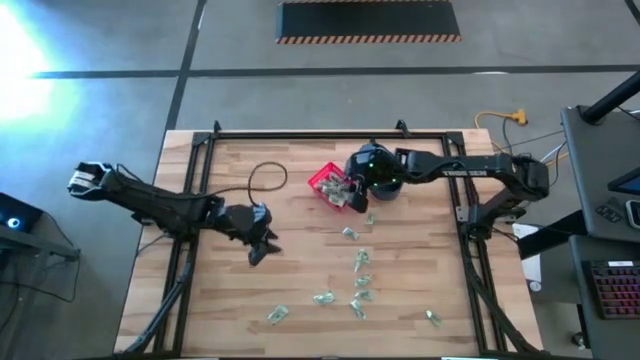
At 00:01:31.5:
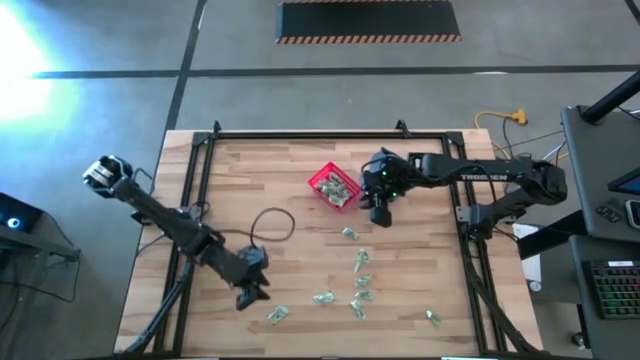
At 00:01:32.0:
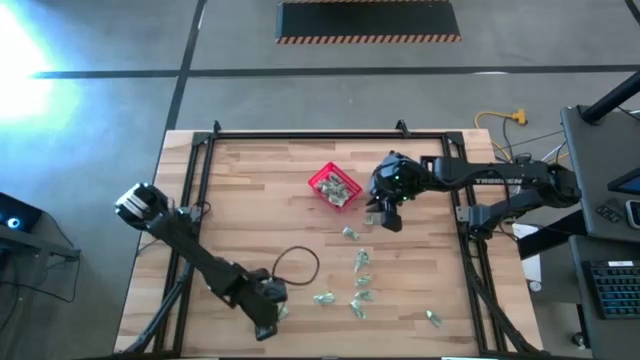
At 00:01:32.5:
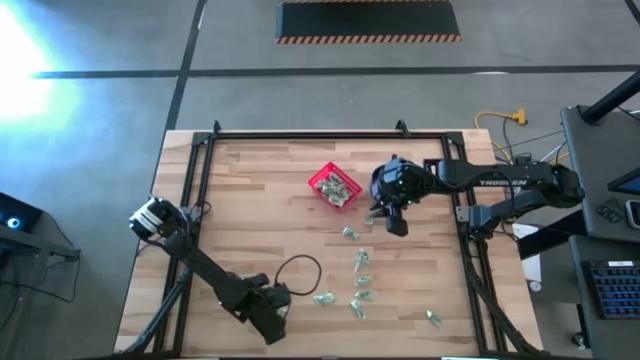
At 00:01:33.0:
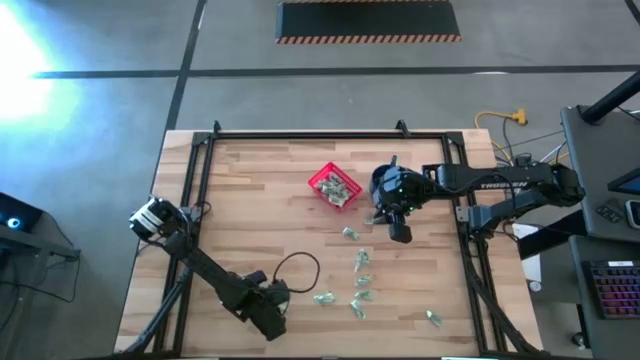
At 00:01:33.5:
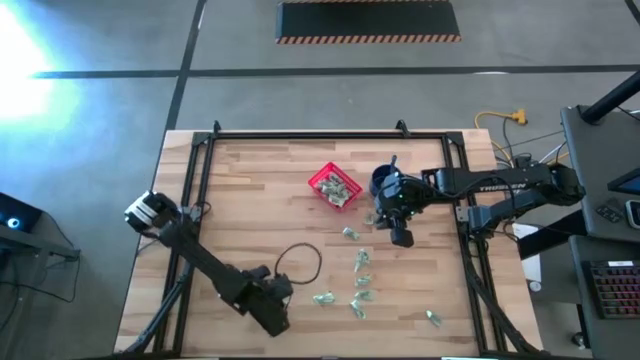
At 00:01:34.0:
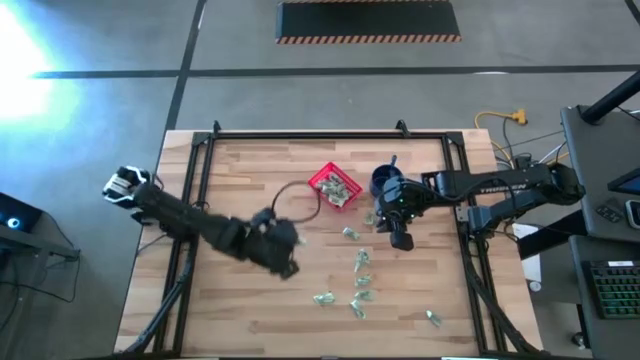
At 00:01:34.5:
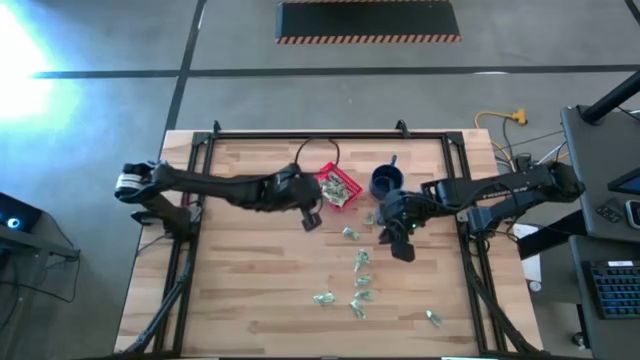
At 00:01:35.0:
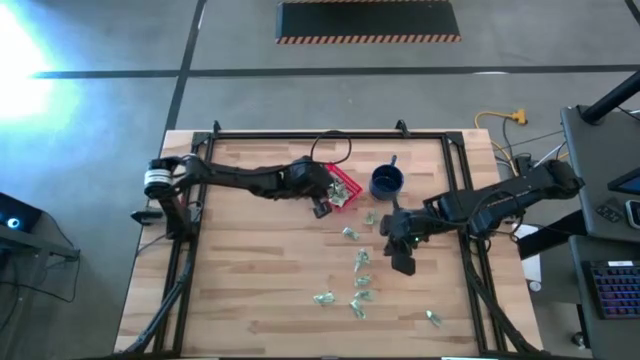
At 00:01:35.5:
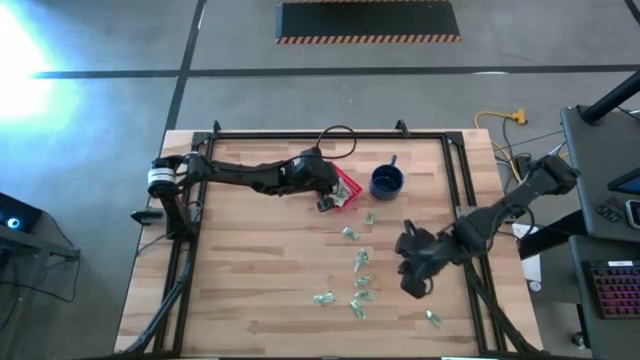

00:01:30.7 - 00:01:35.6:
Task: Pick and place Stevia / Truvia into bins
Put the stevia packet into the red basket

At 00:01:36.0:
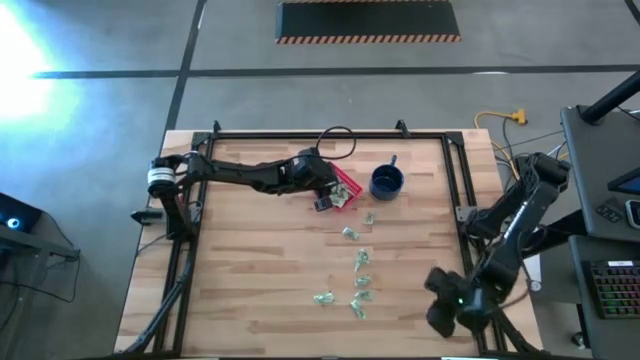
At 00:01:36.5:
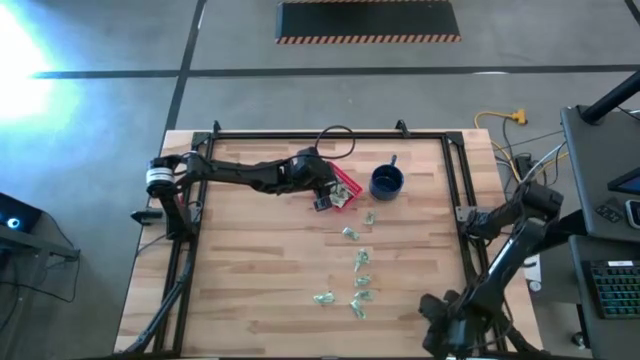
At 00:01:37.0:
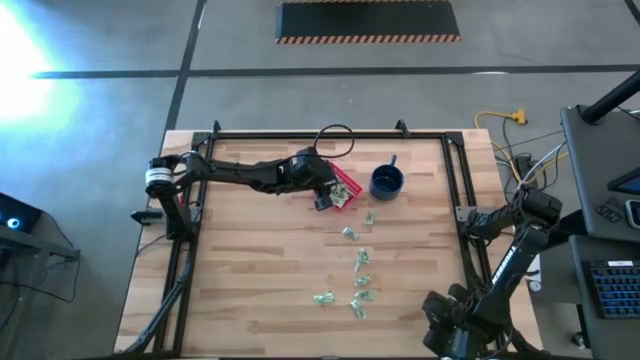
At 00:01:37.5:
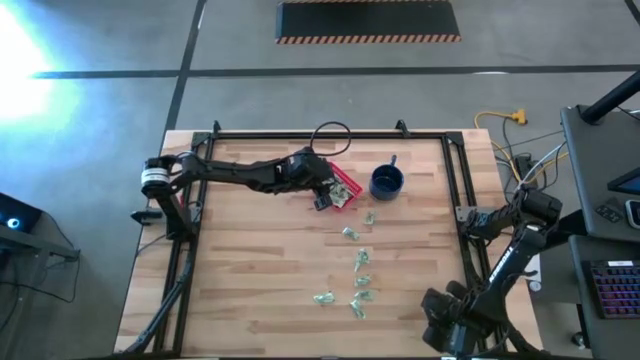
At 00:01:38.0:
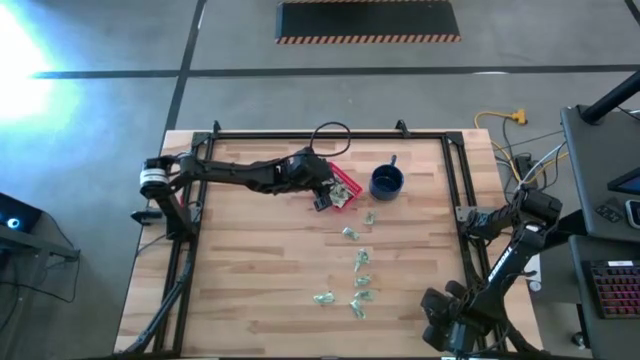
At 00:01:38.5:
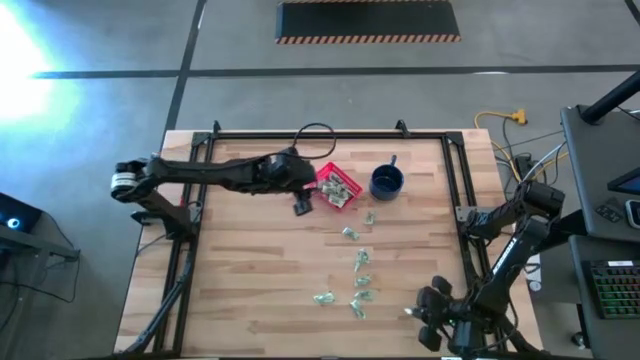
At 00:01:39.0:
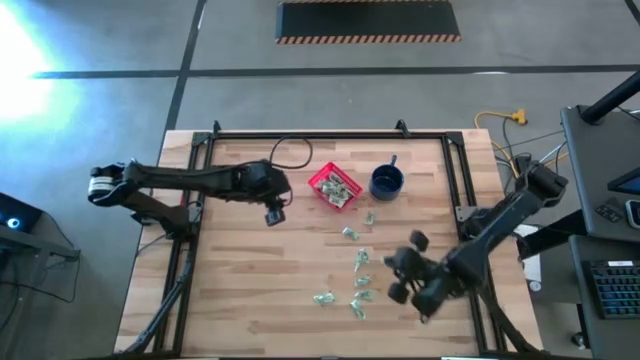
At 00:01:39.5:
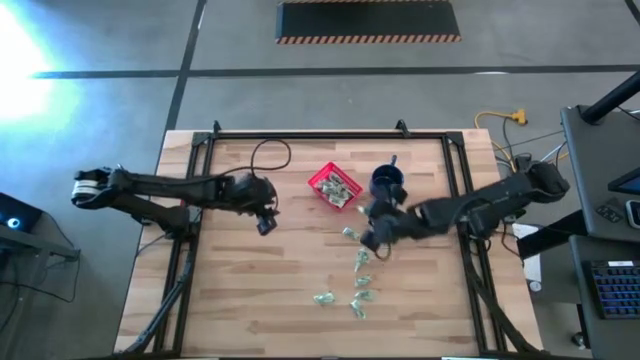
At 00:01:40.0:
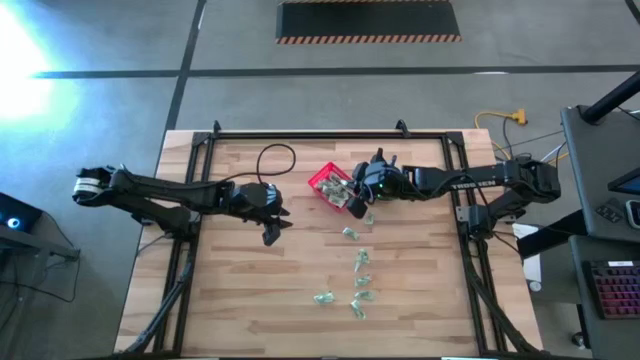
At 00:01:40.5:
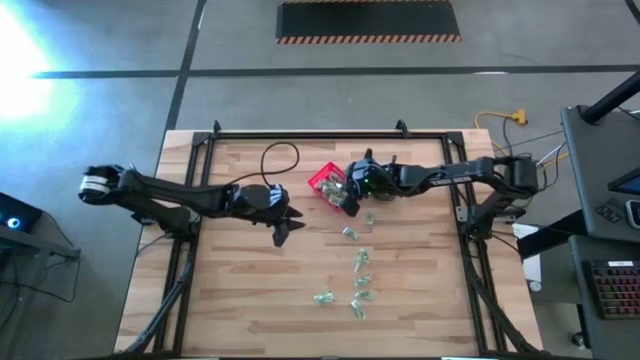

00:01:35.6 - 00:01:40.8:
Put the stevia packet into the red basket

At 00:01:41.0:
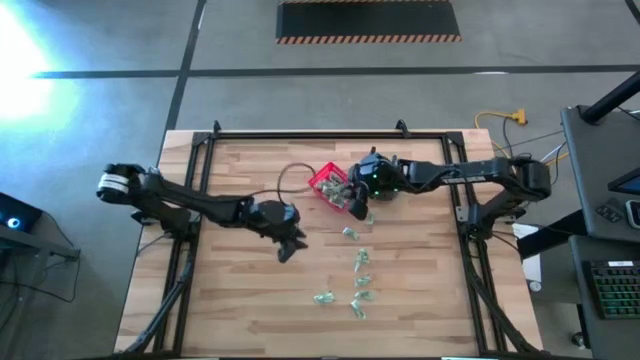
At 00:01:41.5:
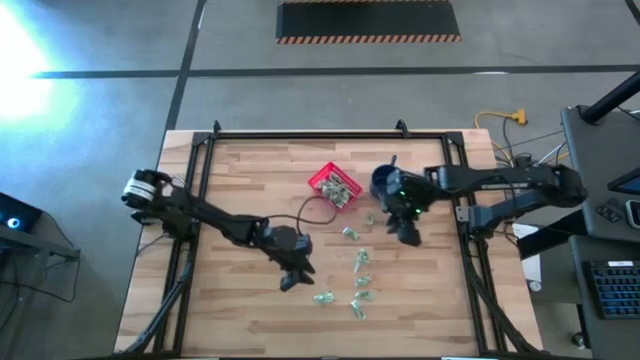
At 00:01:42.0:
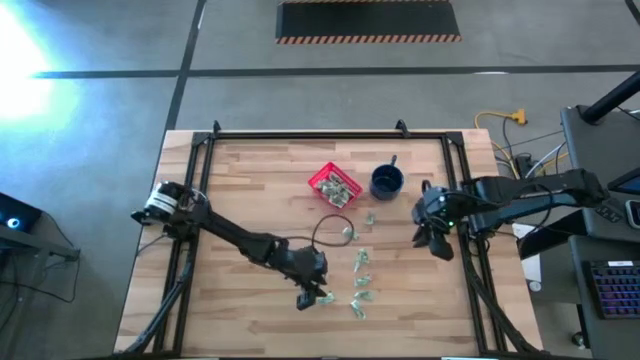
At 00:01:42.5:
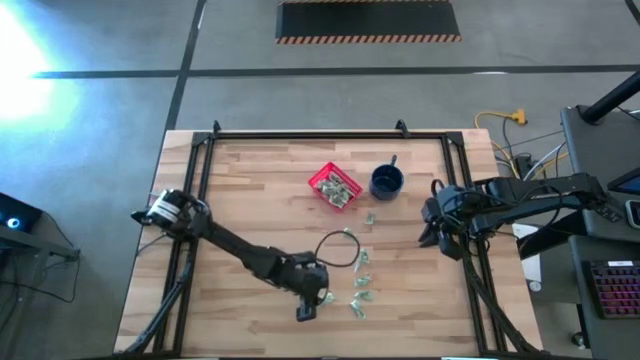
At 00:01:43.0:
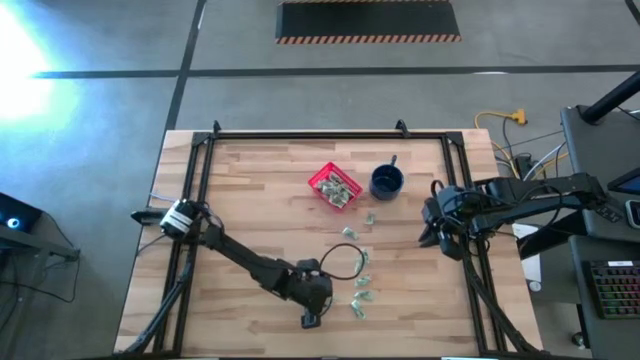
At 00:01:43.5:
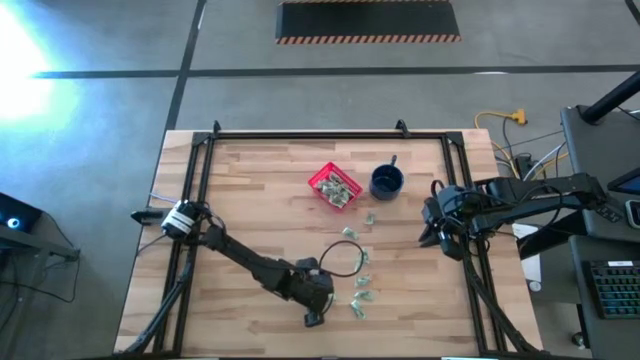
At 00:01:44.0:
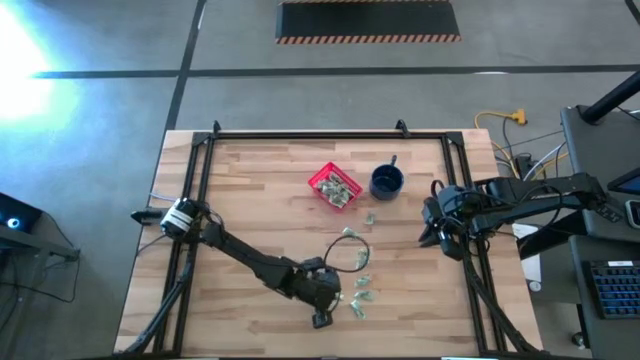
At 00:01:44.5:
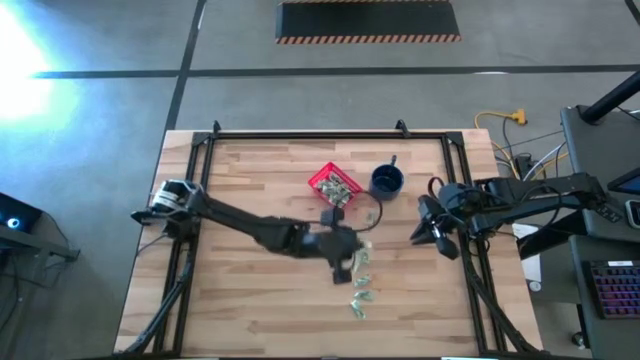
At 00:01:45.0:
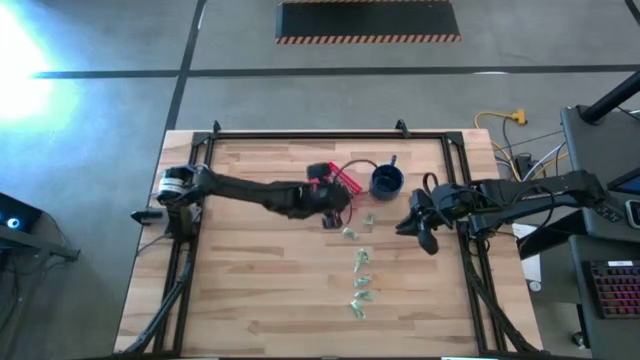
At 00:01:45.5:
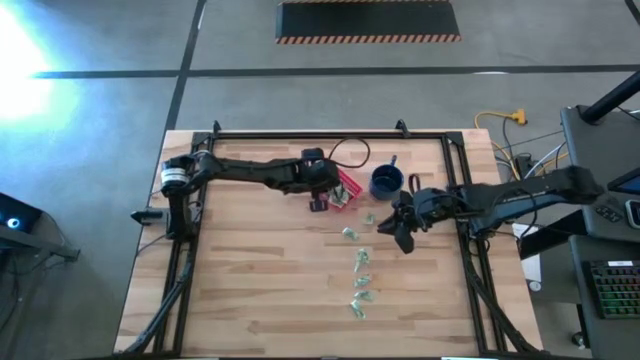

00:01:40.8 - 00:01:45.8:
Put the stevia packet into the red basket

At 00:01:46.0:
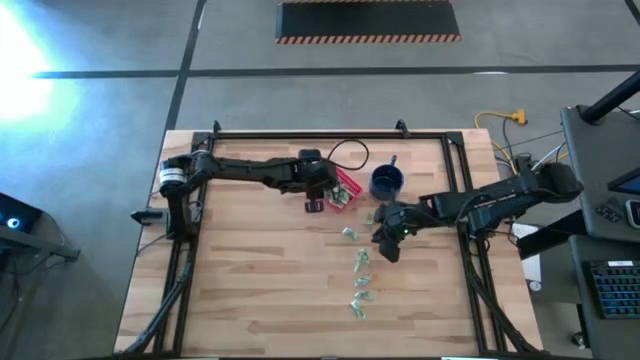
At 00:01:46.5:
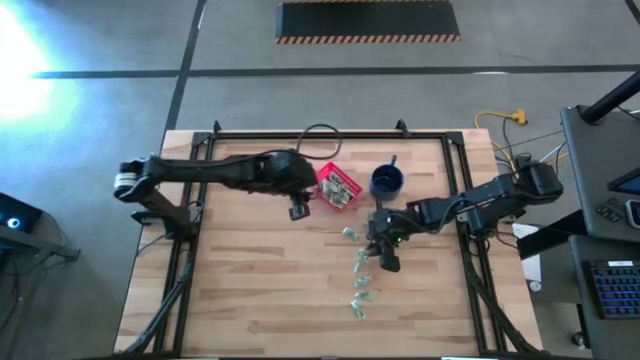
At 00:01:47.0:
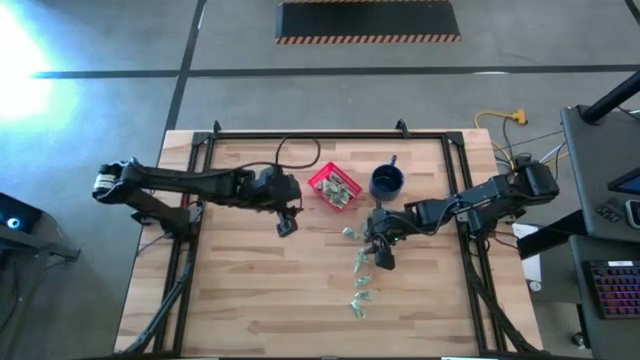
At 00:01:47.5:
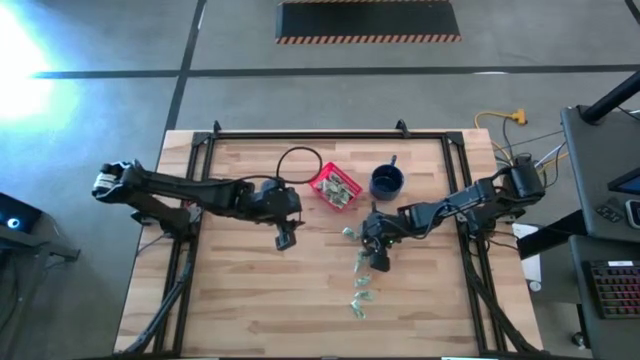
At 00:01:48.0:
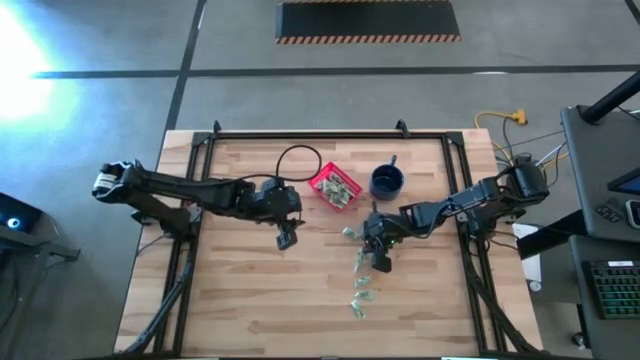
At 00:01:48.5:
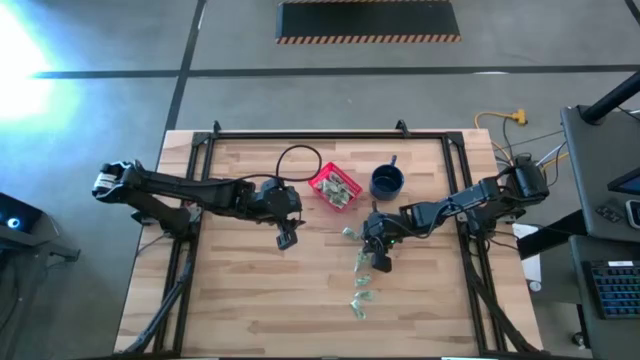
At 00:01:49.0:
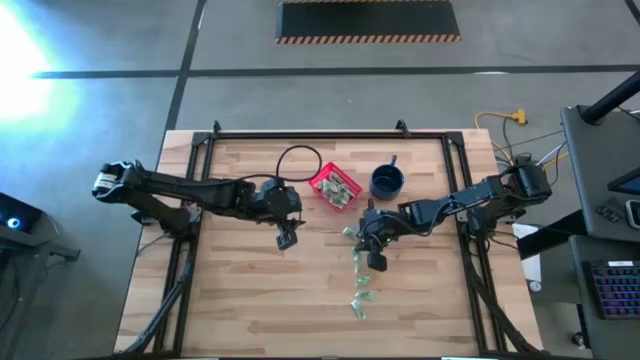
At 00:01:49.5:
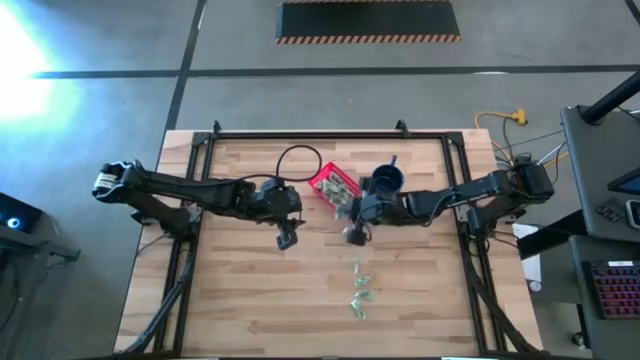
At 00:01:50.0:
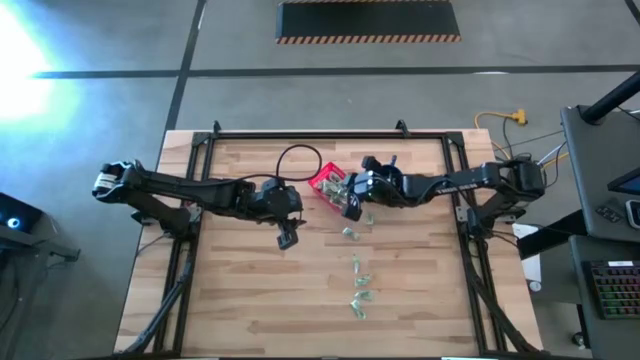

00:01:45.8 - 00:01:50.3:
Put the stevia packet into the red basket

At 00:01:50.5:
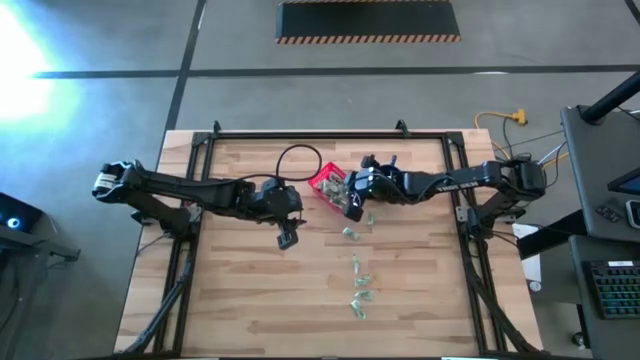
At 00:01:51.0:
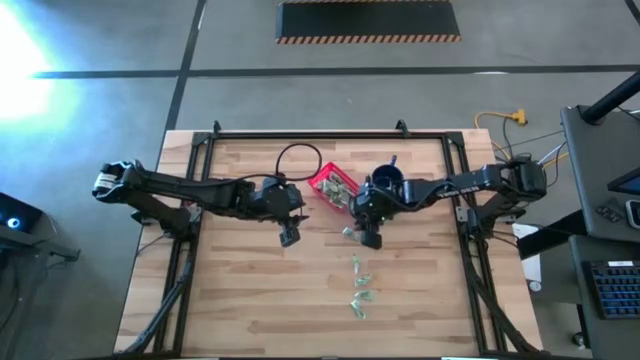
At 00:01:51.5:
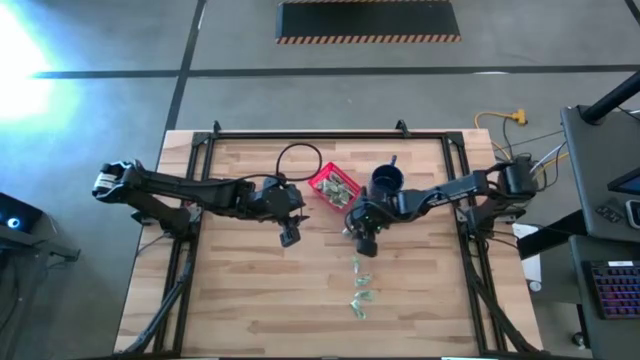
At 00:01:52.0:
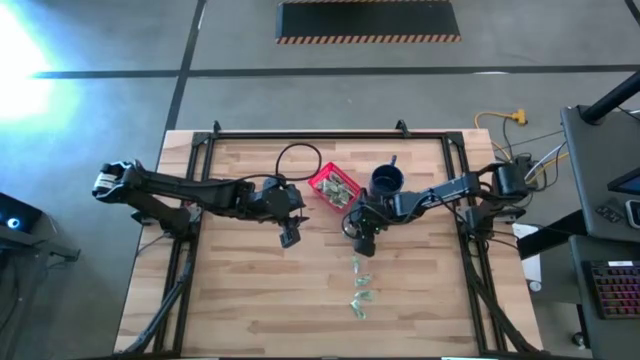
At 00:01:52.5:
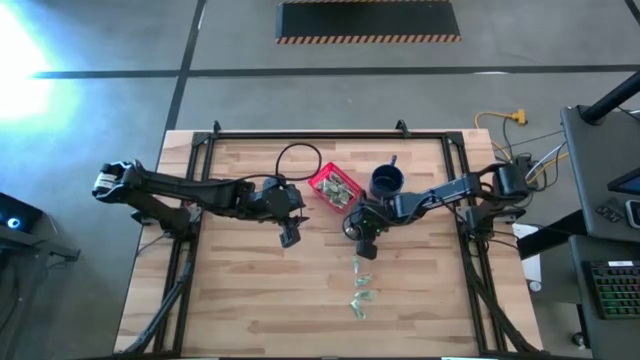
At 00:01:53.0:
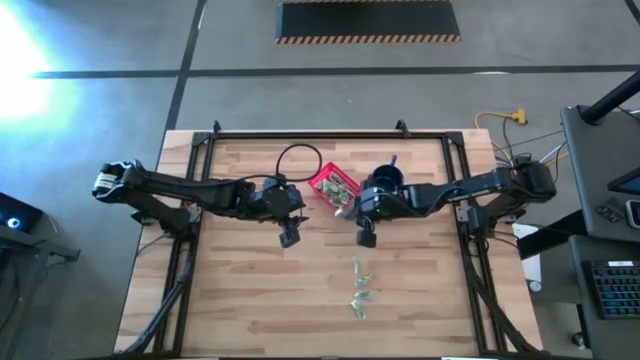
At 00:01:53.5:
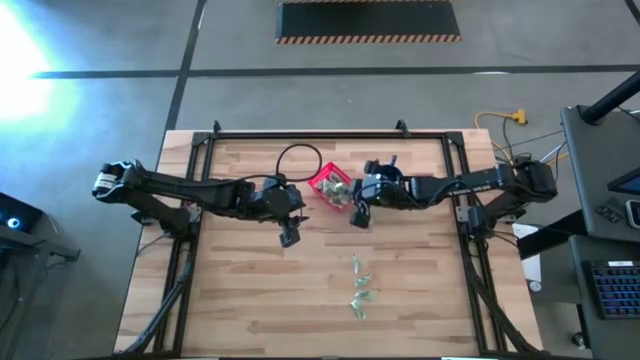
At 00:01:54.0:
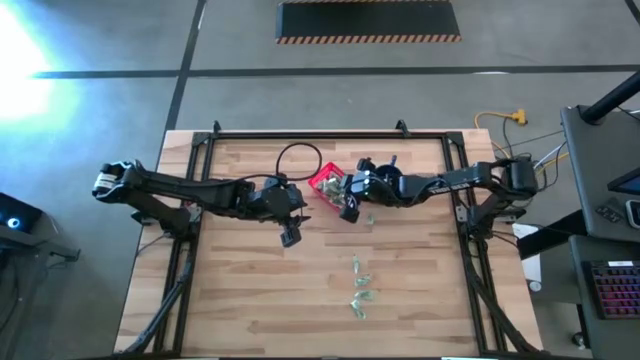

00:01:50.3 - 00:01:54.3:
Put the stevia packet into the red basket
